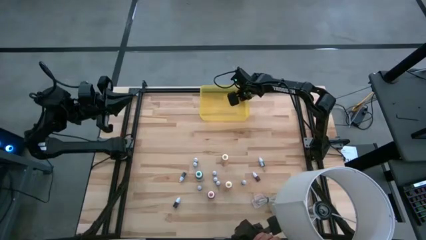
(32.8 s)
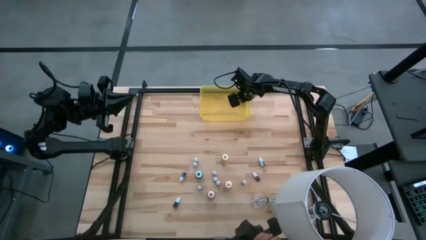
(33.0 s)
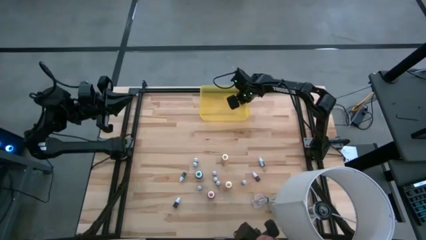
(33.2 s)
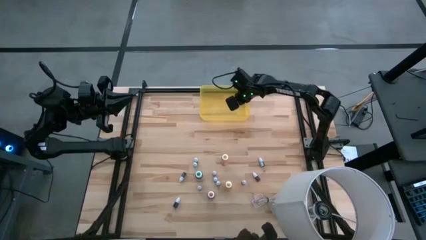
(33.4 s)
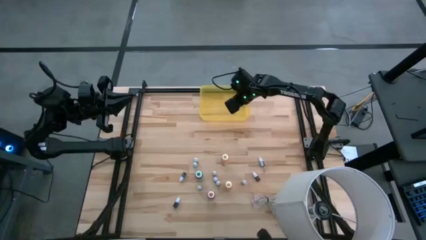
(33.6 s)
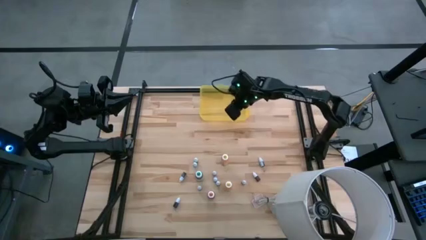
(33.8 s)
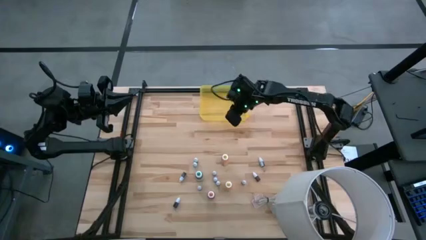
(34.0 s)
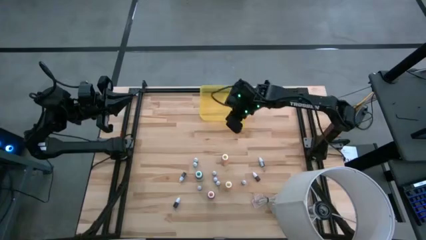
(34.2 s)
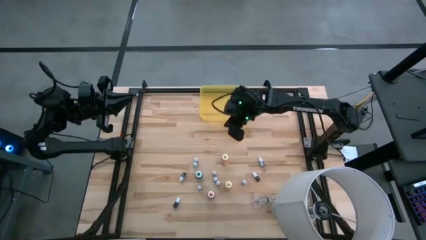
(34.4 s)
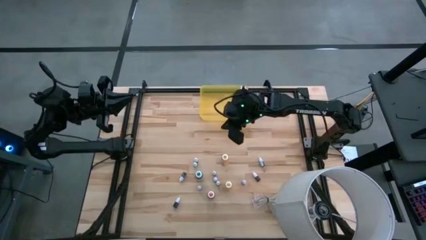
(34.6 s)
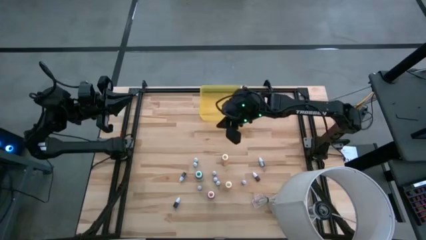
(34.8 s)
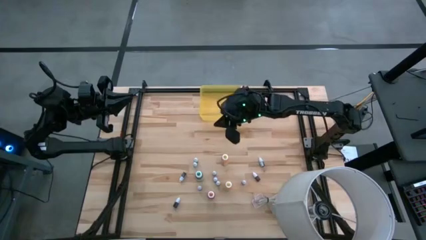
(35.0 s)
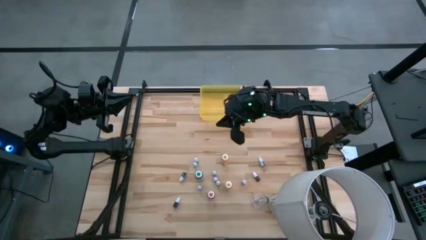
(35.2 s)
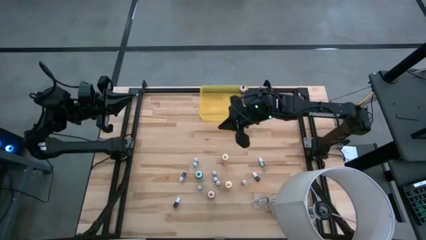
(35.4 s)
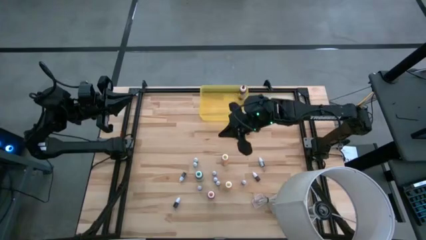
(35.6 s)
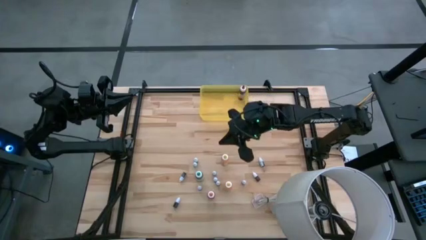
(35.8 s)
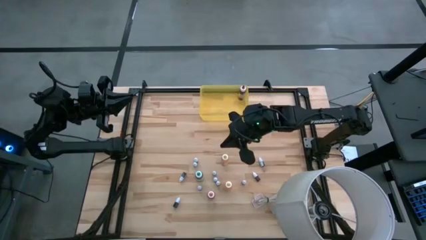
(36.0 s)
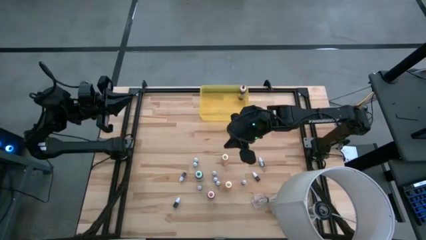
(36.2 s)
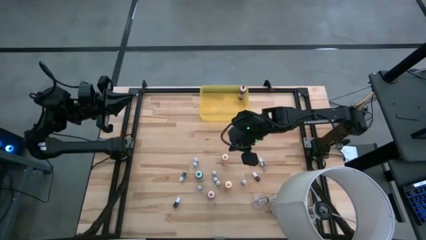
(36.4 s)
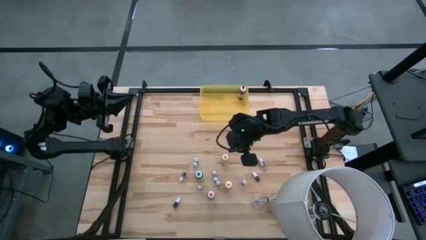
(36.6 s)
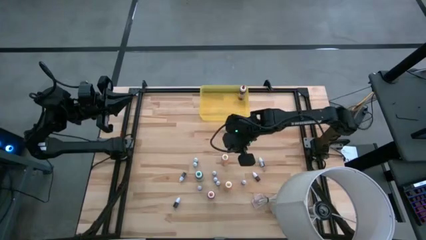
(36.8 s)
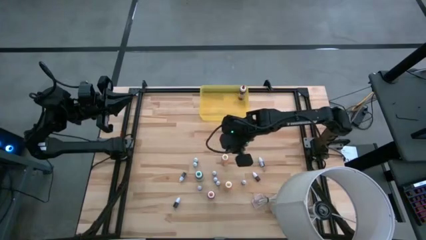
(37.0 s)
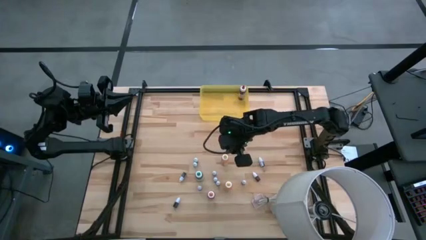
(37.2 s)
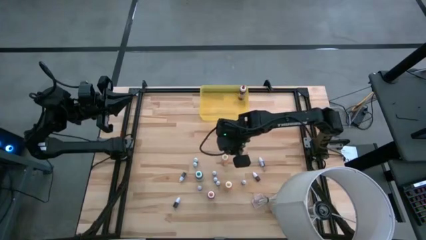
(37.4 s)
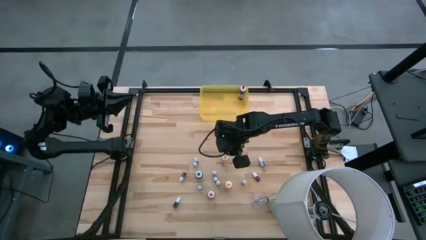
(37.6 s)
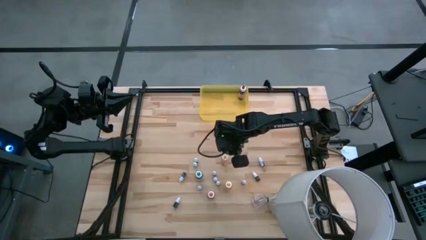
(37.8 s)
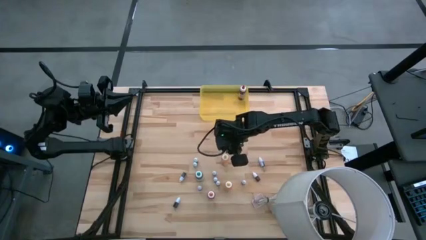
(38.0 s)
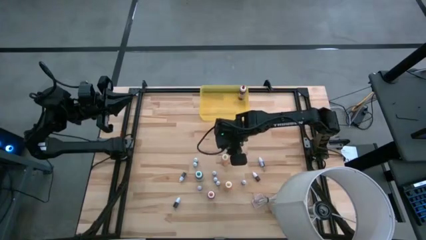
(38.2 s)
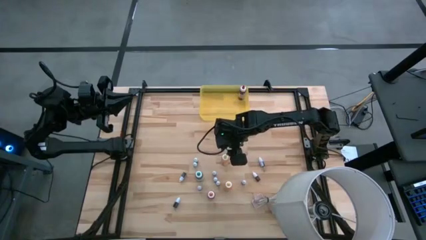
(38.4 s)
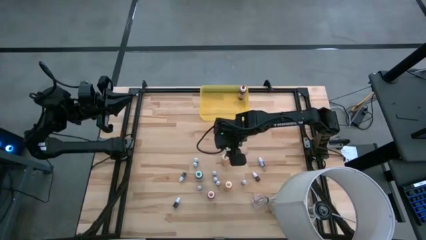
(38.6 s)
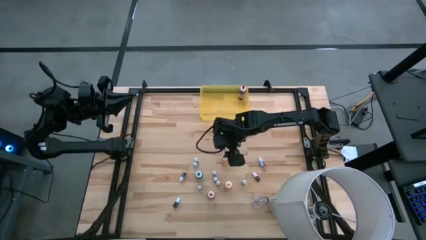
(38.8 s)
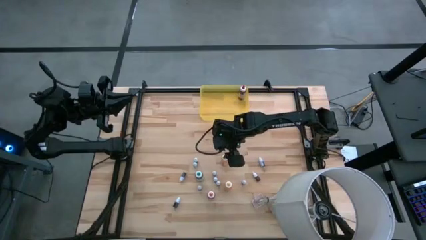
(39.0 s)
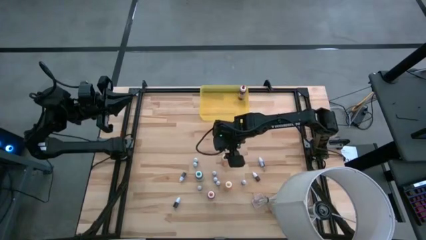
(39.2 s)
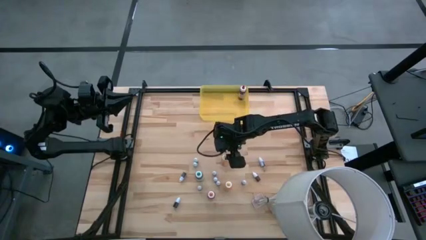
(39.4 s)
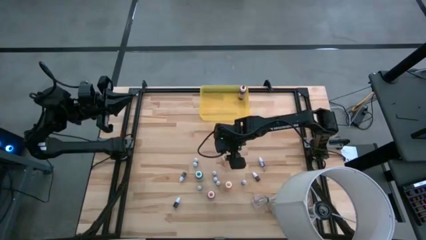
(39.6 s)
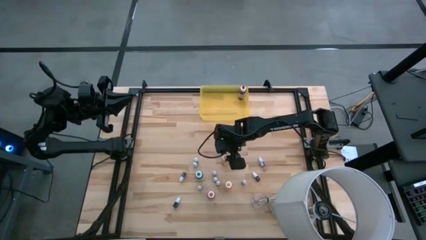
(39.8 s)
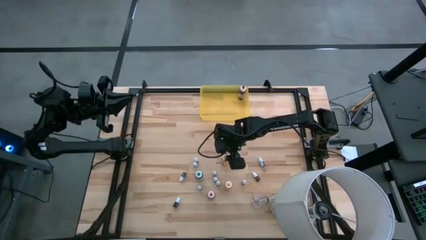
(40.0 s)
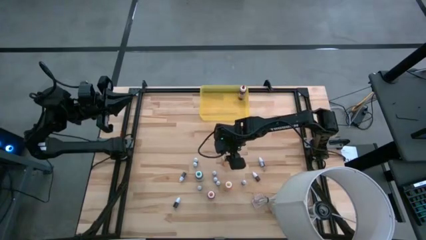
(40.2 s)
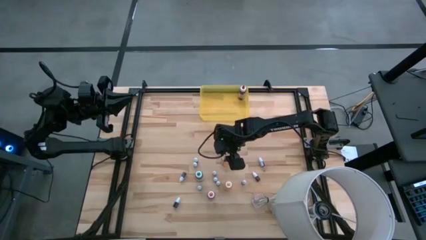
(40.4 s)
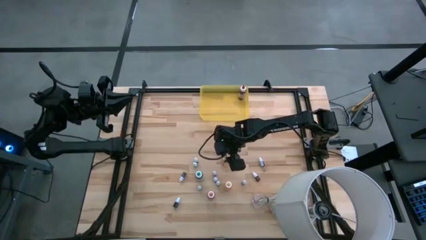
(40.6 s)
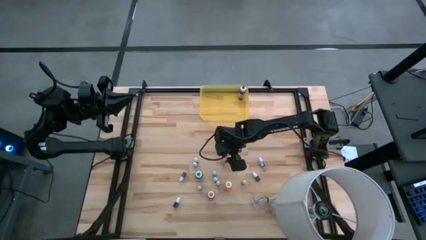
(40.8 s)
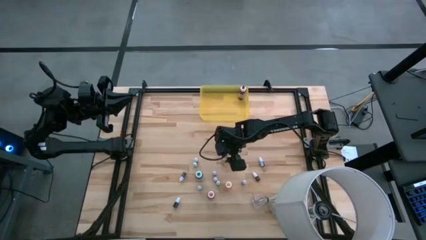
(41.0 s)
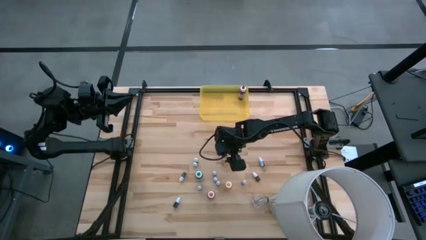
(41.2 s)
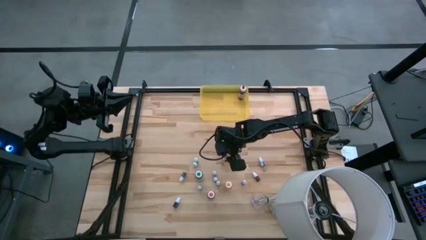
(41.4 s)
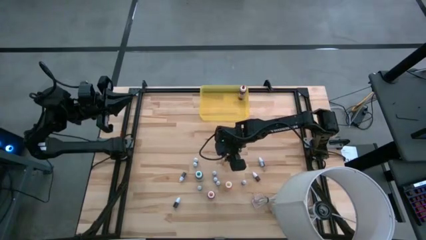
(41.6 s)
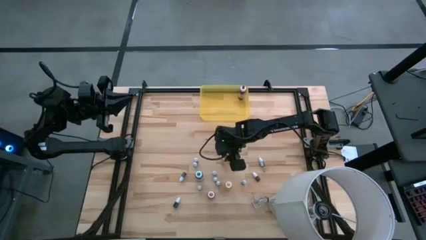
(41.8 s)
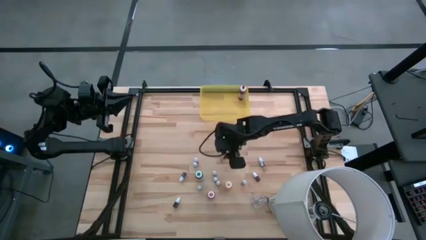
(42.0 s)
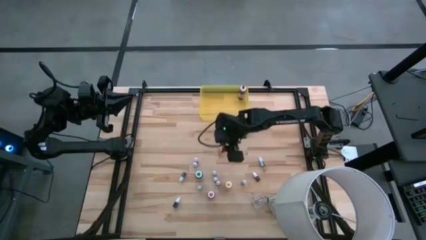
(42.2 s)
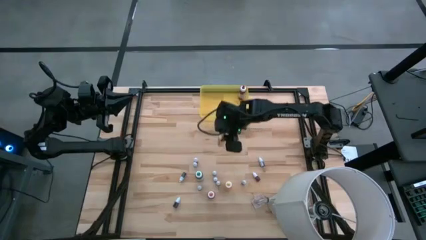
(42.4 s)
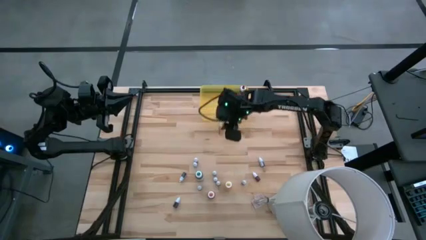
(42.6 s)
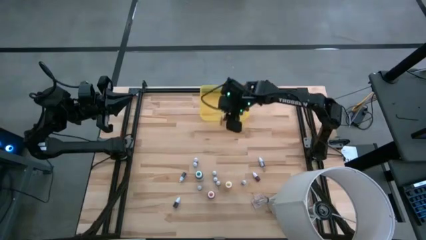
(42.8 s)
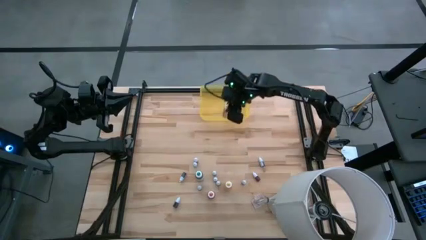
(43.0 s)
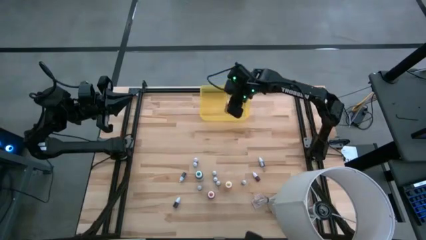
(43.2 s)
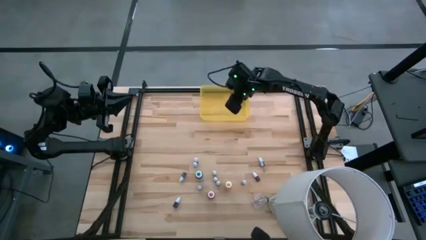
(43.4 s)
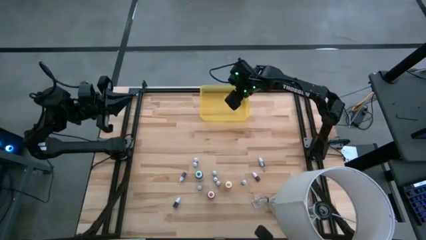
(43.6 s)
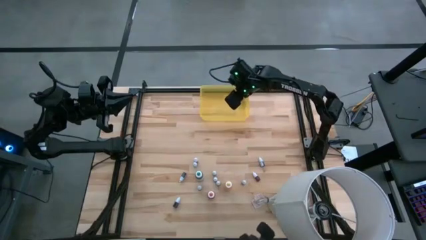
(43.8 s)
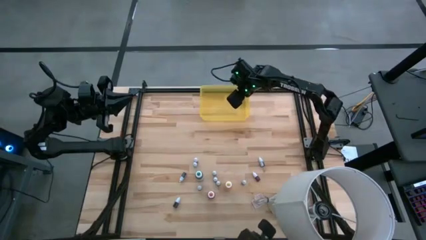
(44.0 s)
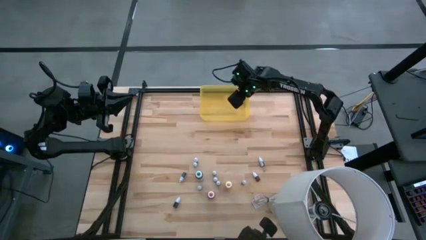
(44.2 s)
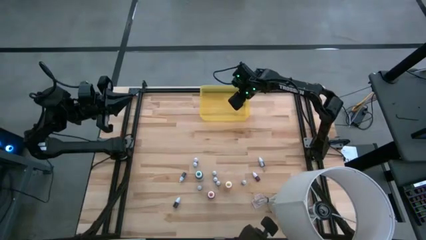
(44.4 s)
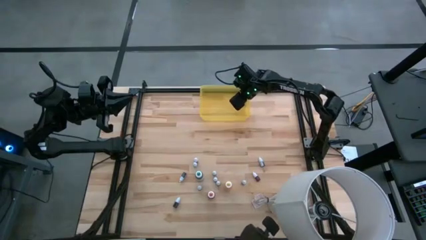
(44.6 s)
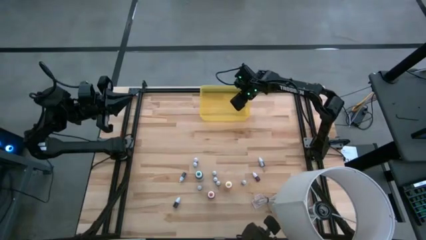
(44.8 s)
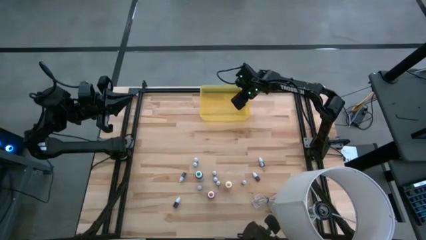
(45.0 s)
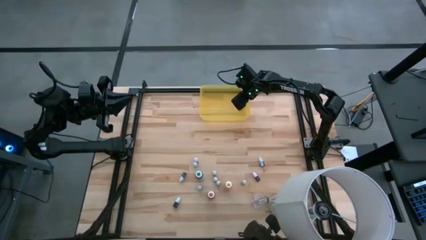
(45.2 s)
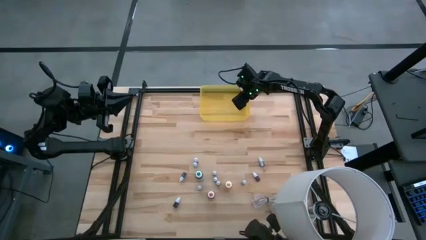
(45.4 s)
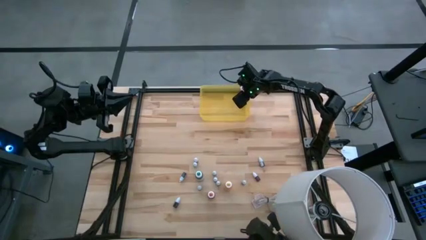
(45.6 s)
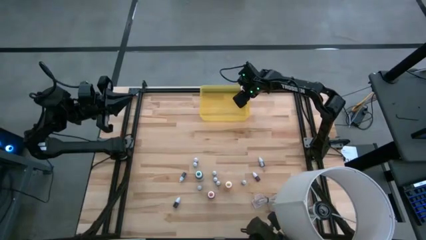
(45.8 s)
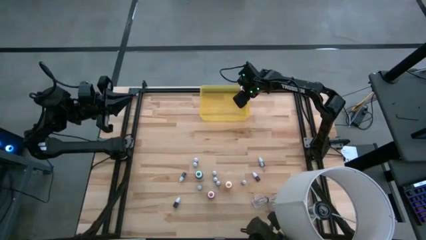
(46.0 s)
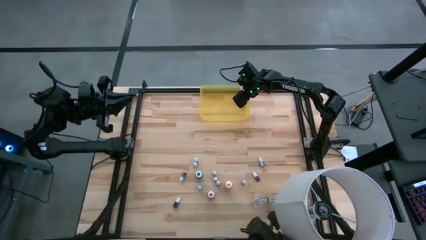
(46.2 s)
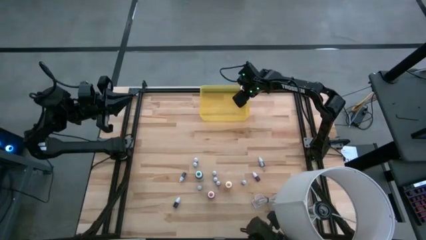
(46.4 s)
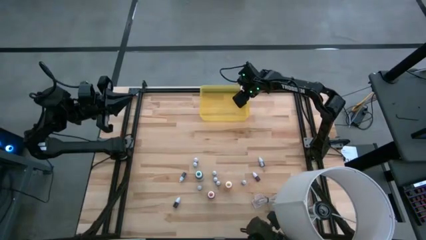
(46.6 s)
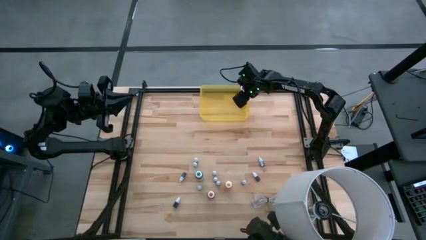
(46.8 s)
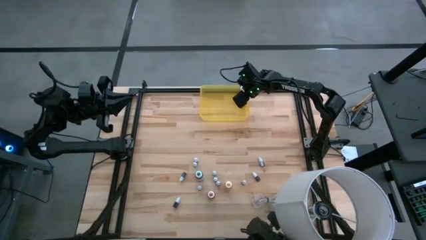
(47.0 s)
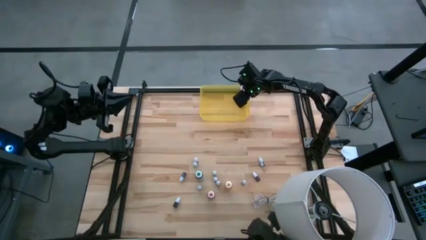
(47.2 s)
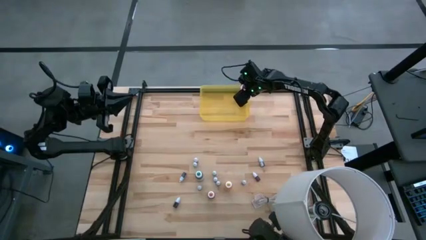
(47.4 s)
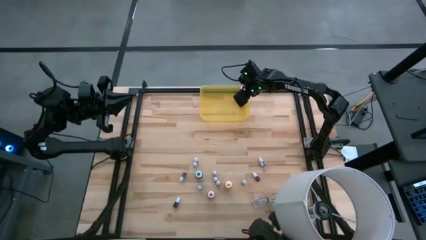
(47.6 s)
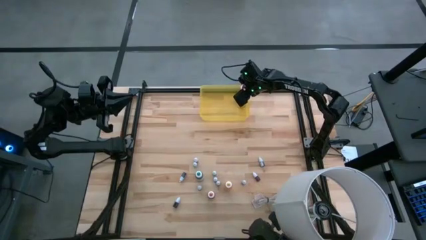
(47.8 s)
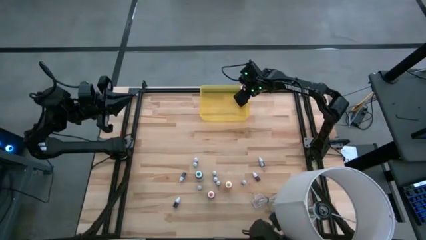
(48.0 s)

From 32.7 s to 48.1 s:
Task: Pick & Place food coloring
Put the top large yellow food coloring bottle into the yellow bin
